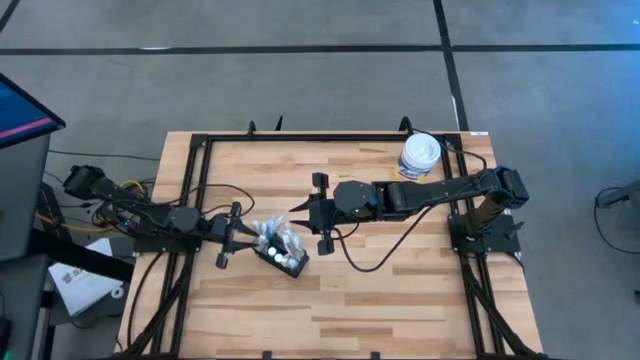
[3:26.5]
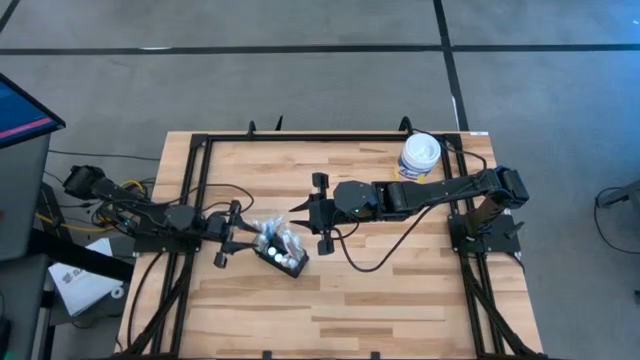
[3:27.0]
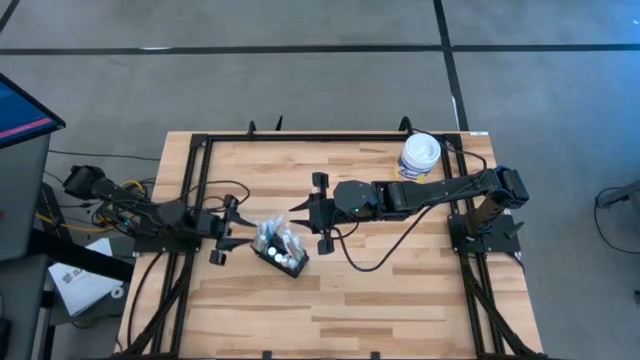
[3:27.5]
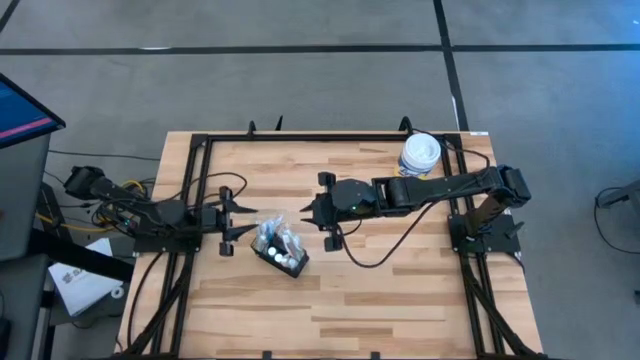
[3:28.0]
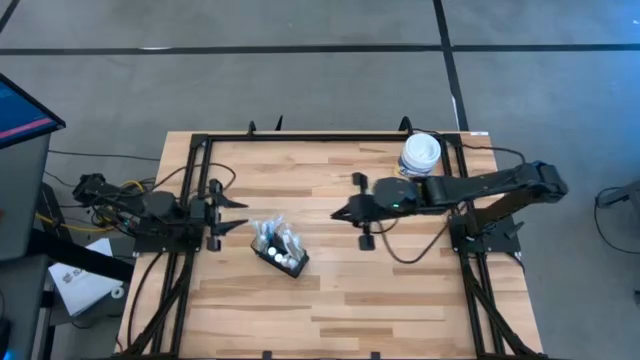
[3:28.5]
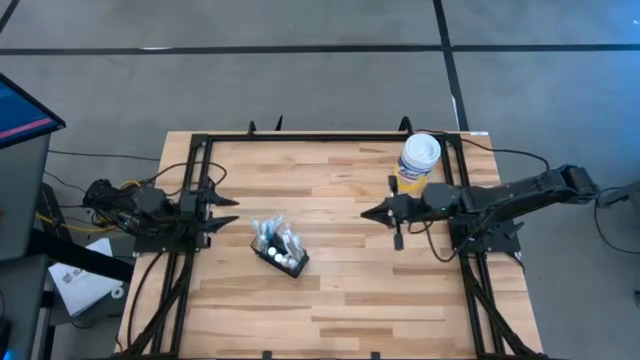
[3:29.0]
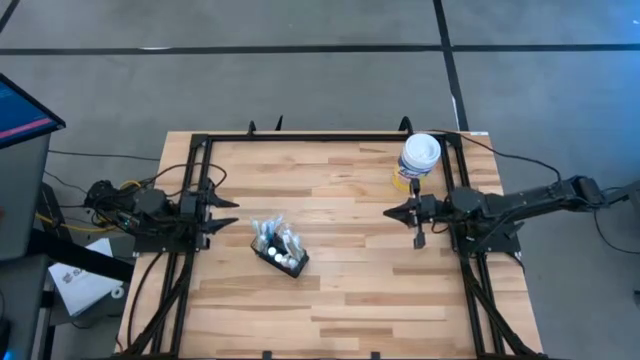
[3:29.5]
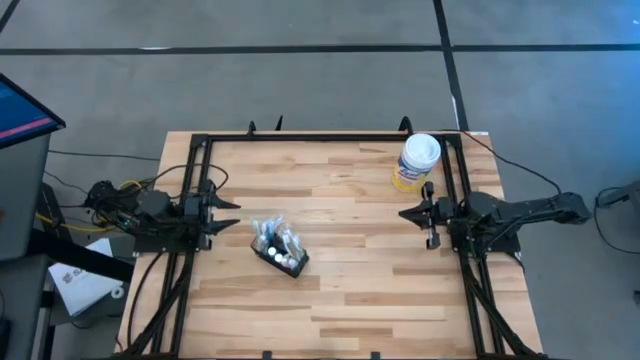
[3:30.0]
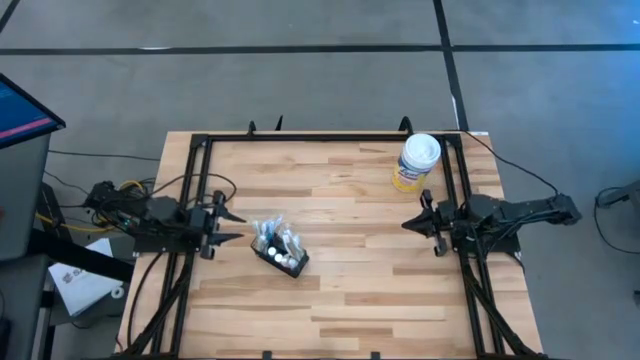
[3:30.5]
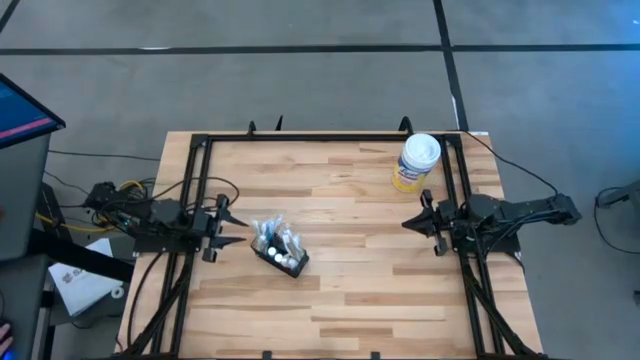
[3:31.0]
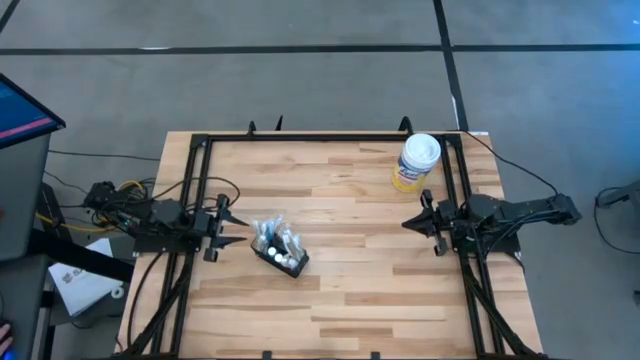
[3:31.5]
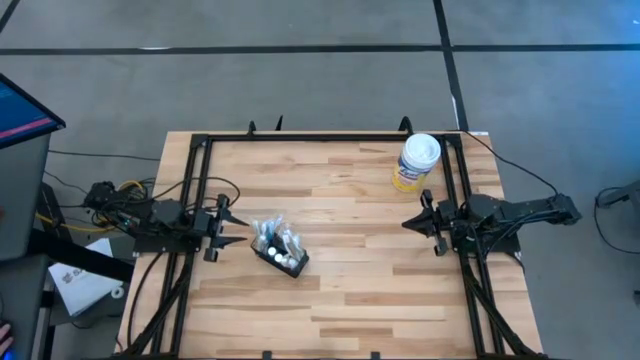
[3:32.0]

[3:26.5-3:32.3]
Task: Pick & Place toothbrushing station
Return to Home Position

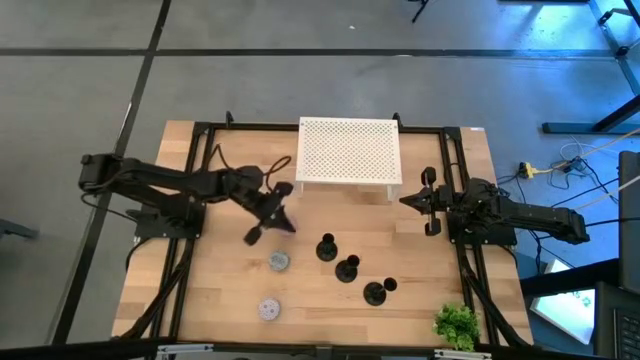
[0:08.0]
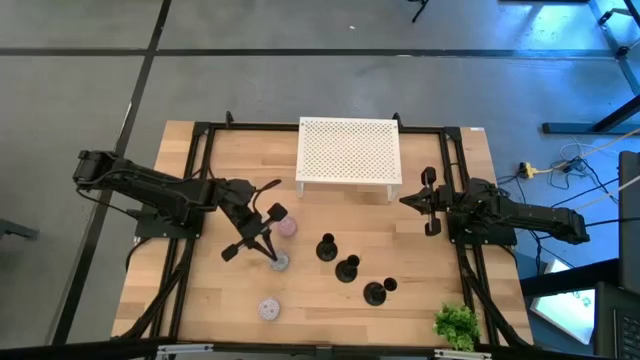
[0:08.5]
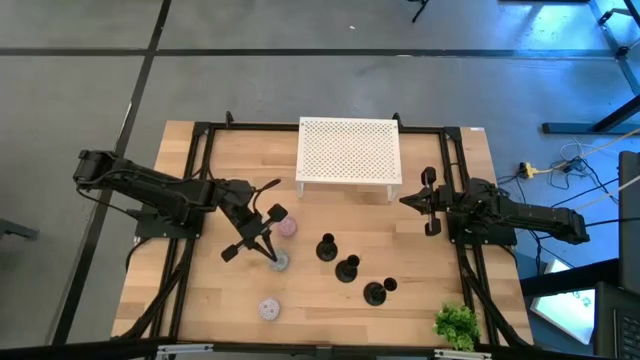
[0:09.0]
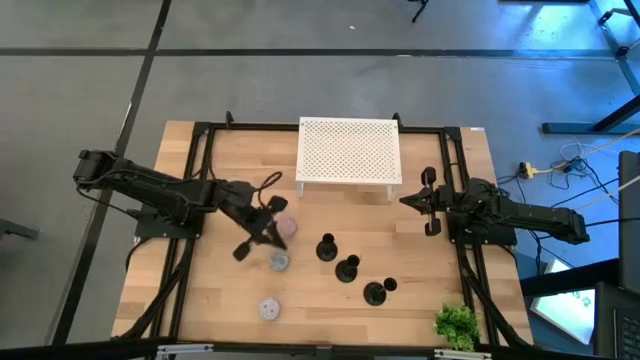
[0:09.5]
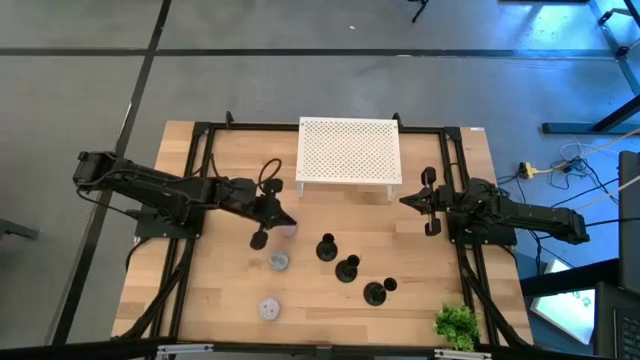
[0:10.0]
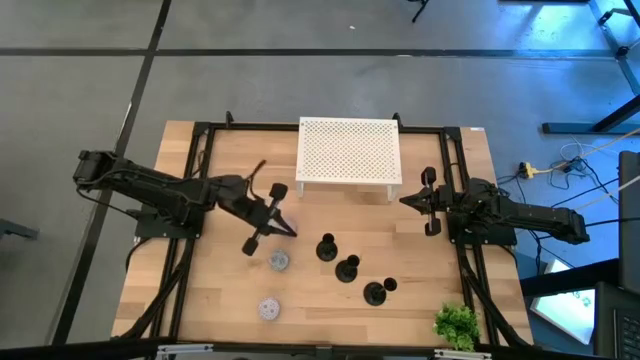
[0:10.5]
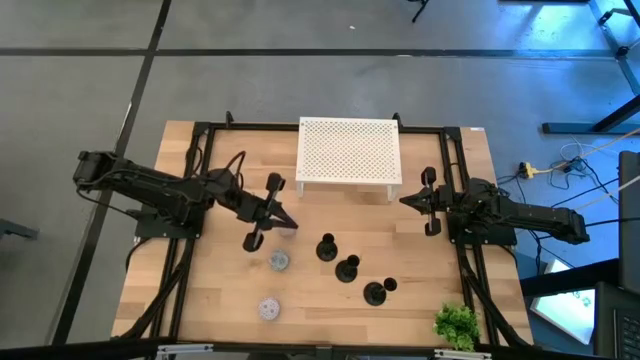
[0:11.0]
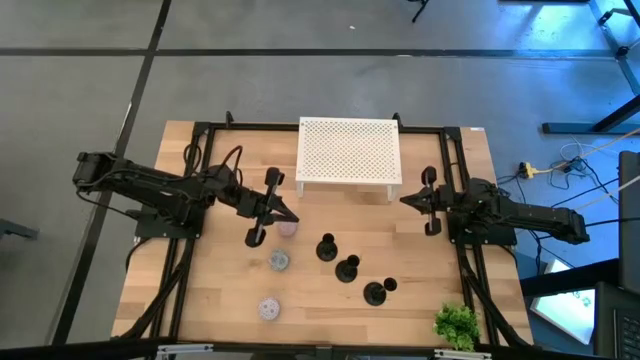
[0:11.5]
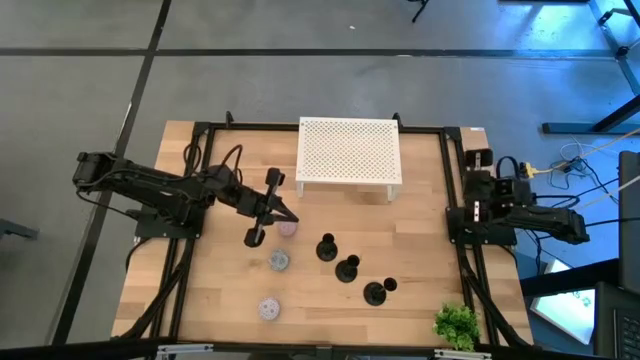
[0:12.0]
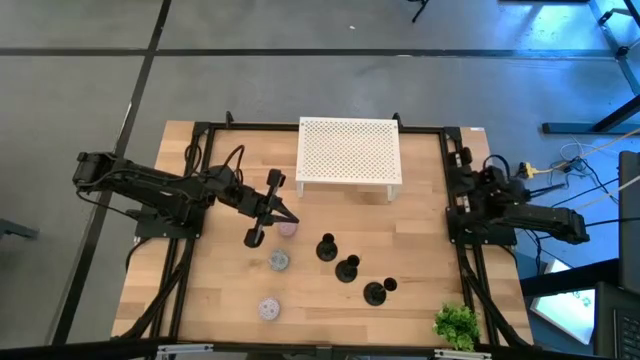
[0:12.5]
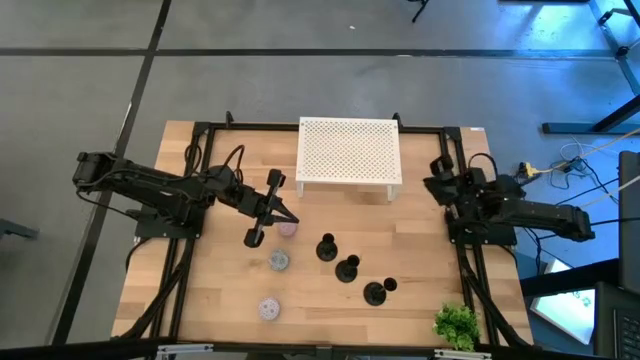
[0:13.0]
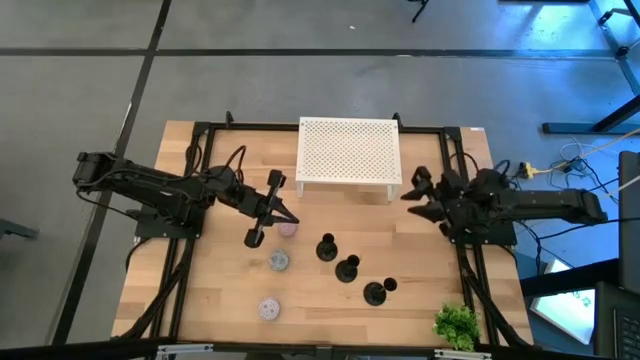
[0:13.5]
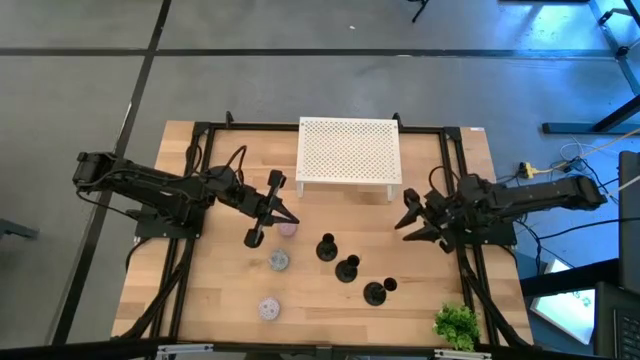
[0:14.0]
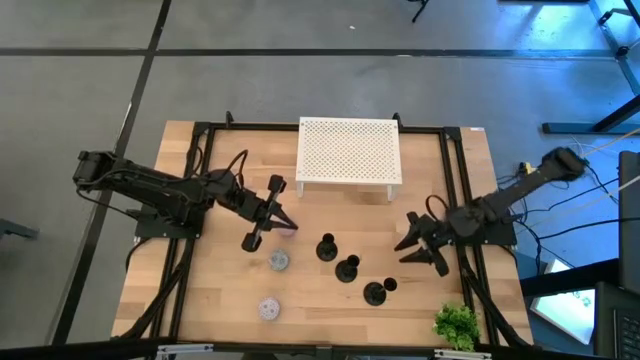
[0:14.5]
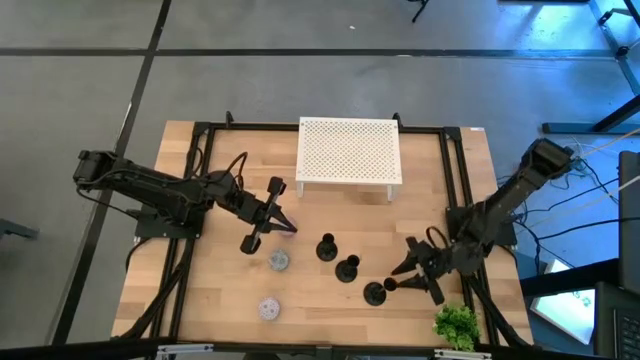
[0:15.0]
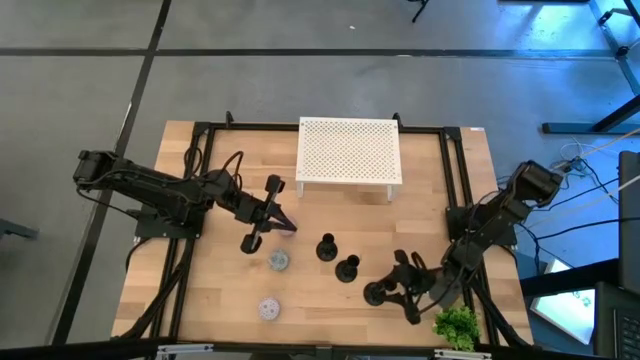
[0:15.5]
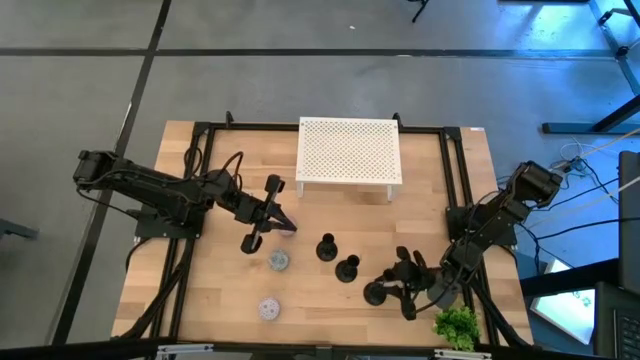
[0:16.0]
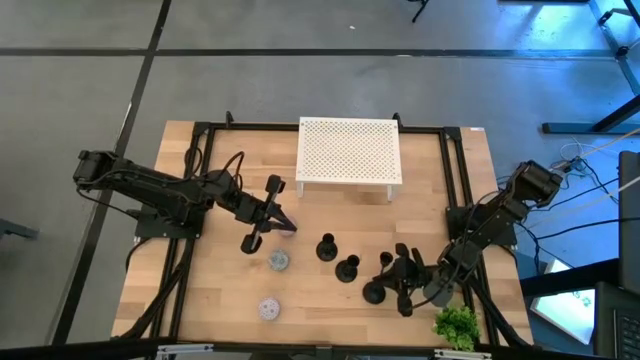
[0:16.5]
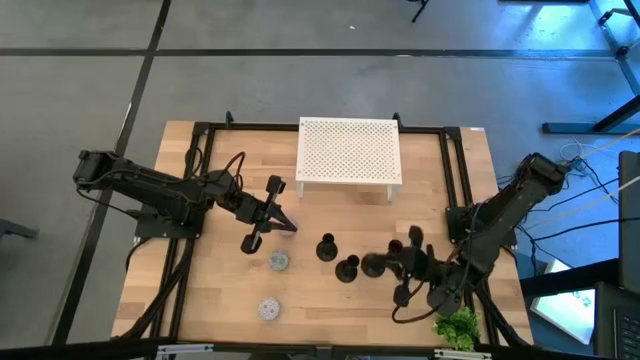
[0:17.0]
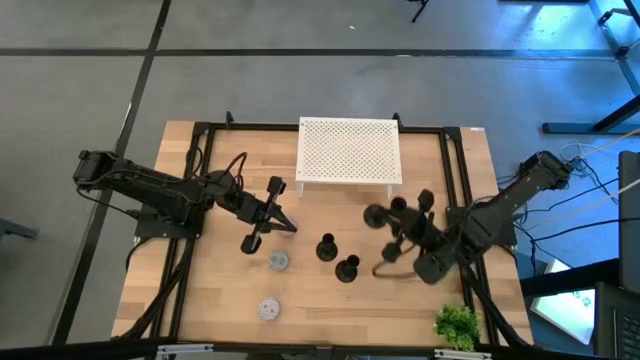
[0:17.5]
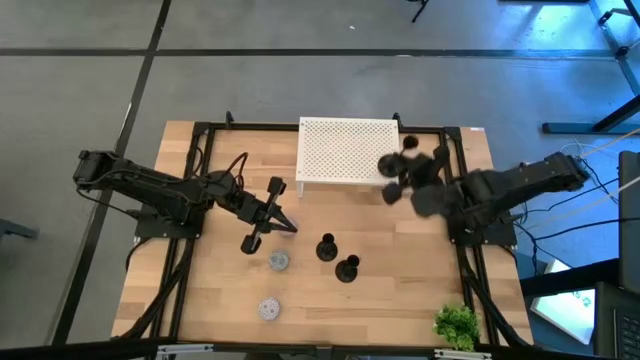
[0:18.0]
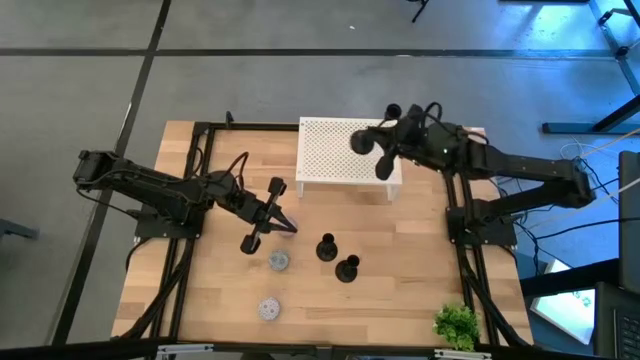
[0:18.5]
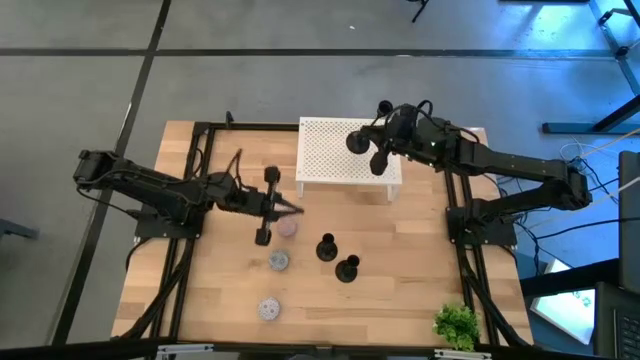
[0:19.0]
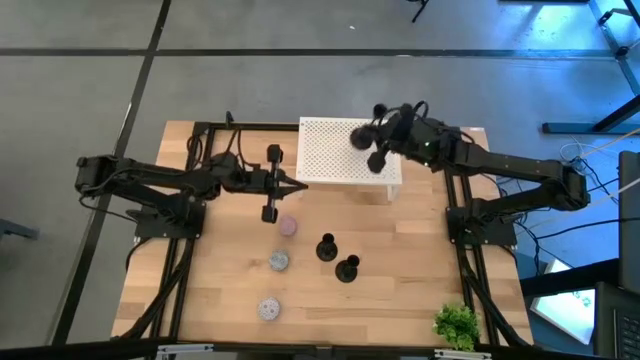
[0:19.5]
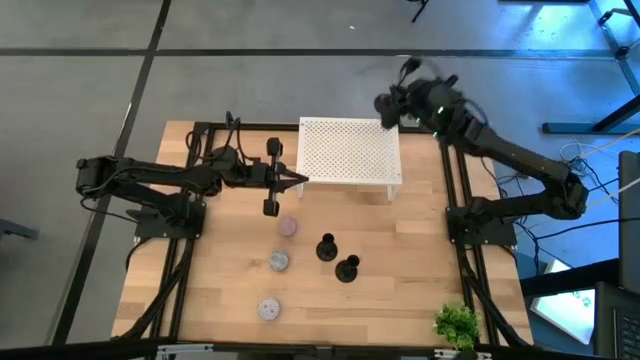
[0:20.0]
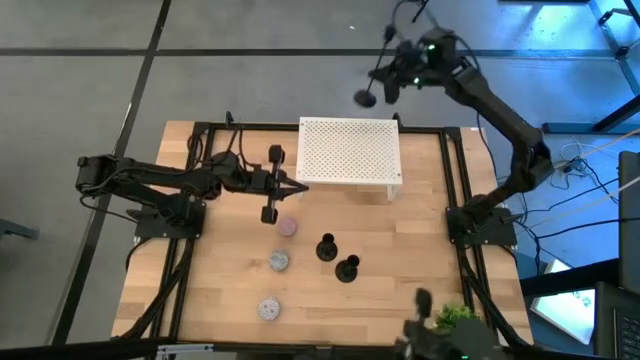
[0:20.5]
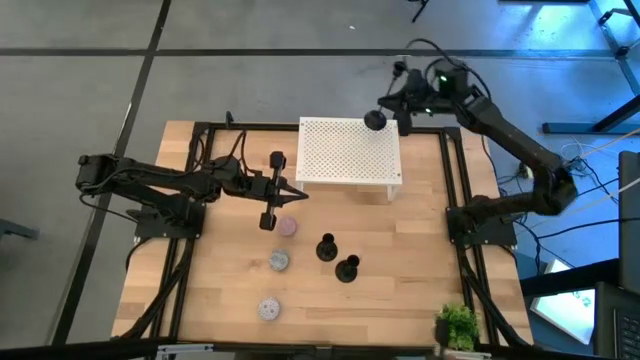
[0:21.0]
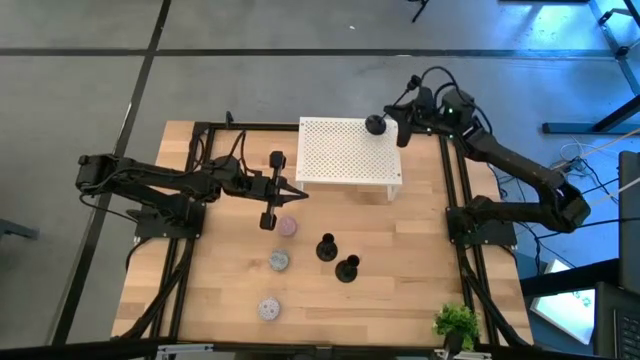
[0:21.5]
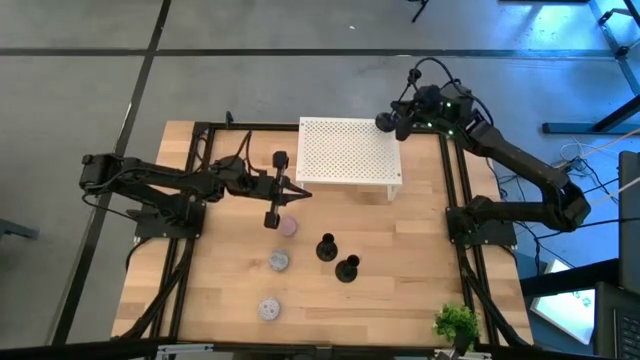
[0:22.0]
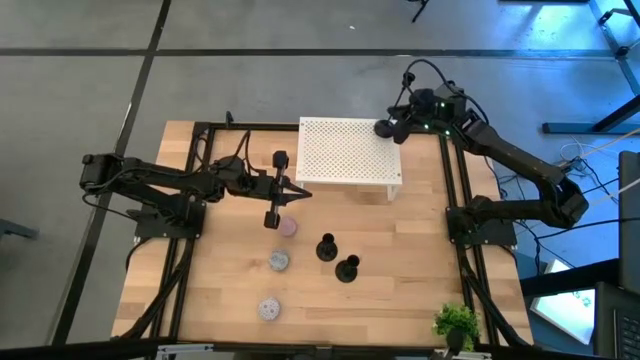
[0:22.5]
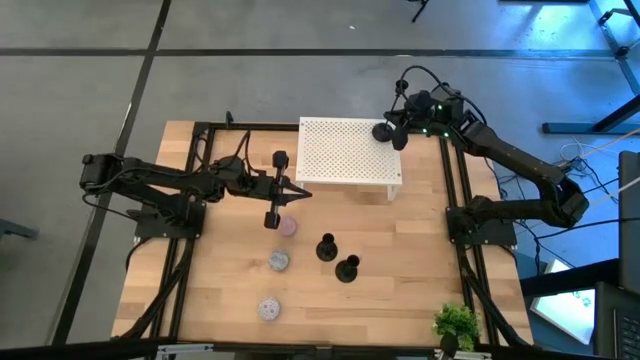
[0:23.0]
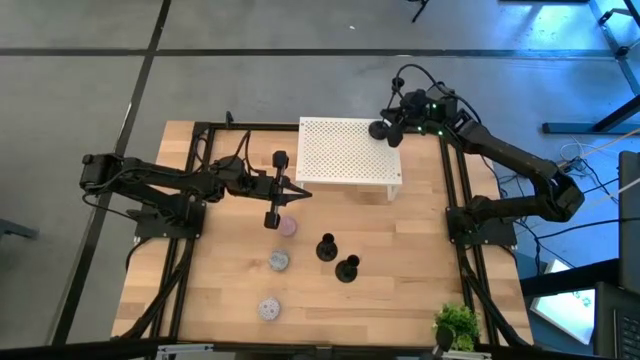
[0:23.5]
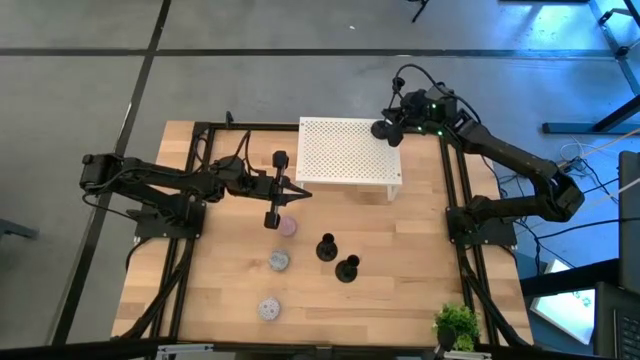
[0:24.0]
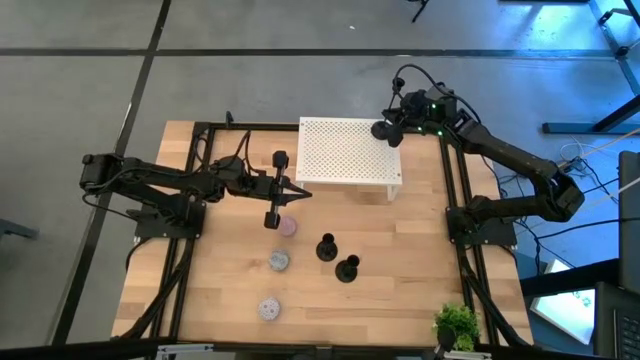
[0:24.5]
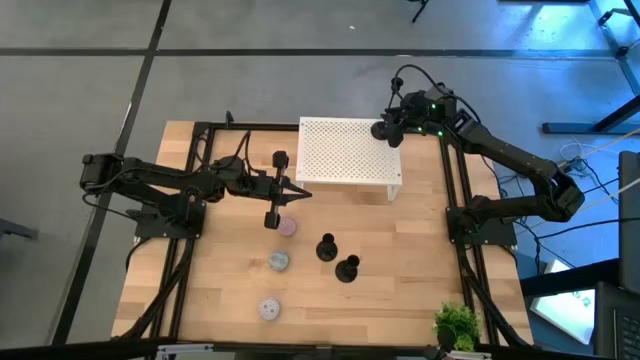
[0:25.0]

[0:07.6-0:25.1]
Task: Pick & Place candle stick holders
Put the bottom candle holder on the shelf
